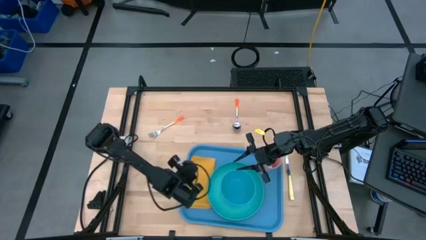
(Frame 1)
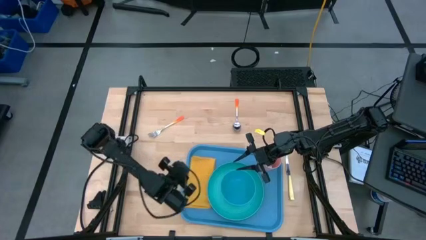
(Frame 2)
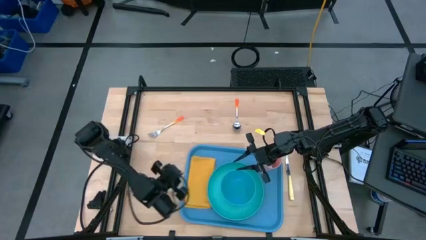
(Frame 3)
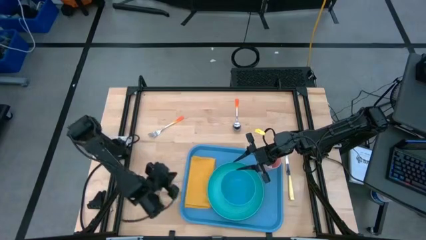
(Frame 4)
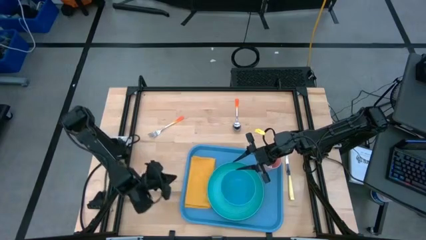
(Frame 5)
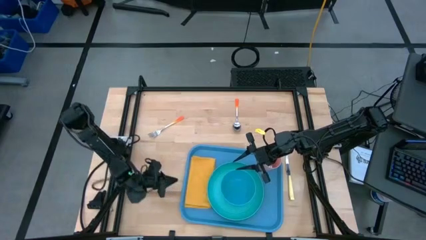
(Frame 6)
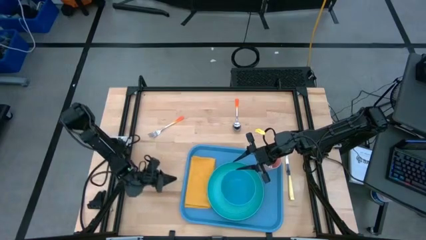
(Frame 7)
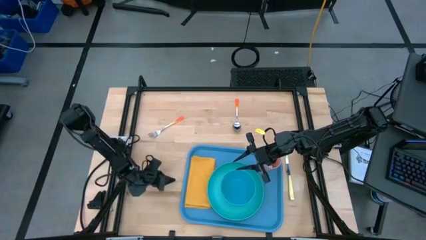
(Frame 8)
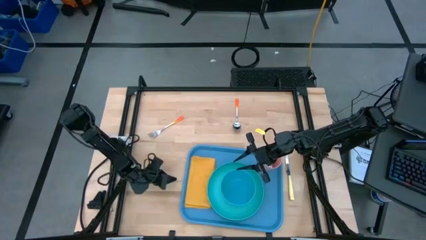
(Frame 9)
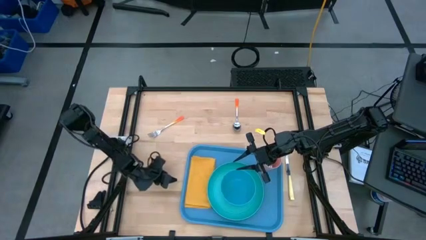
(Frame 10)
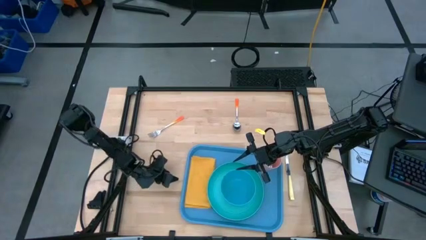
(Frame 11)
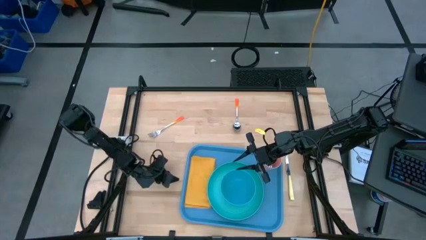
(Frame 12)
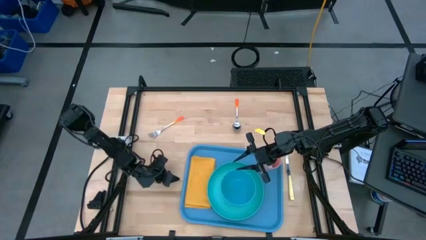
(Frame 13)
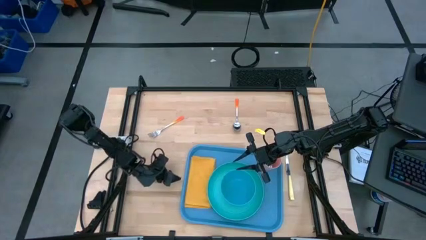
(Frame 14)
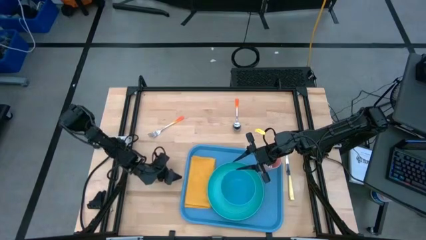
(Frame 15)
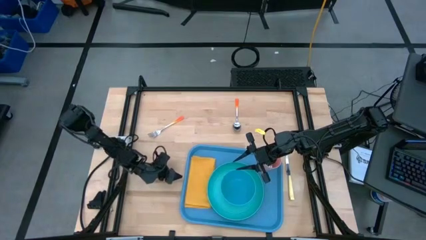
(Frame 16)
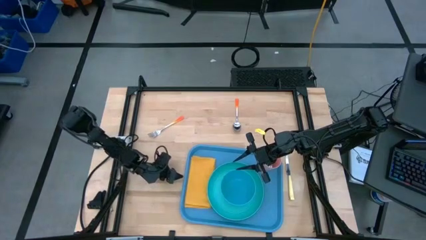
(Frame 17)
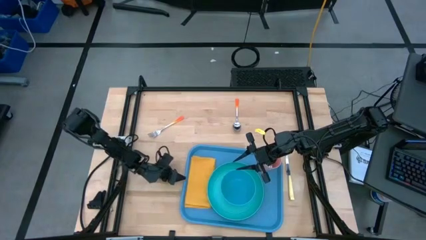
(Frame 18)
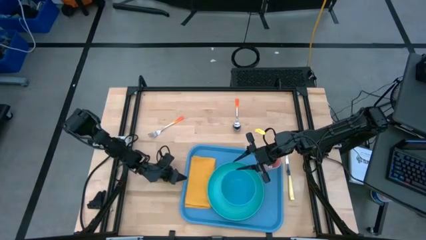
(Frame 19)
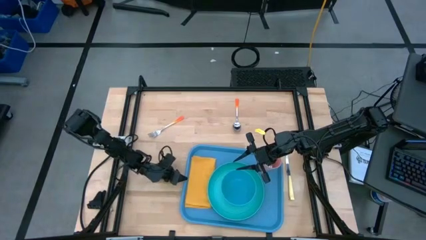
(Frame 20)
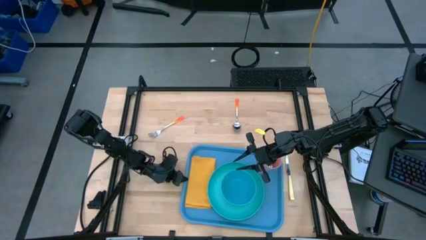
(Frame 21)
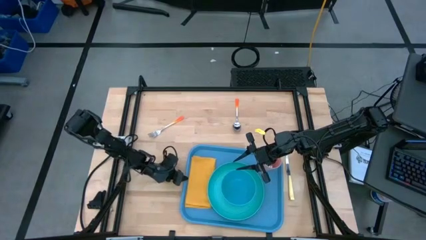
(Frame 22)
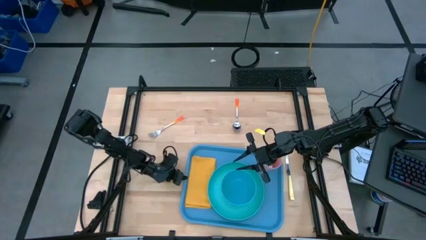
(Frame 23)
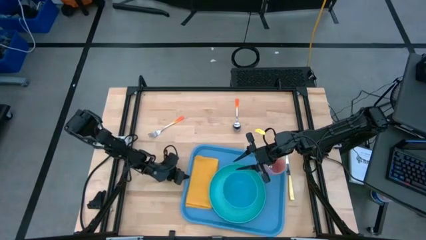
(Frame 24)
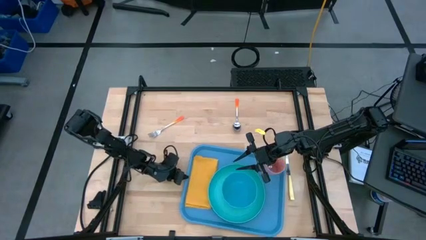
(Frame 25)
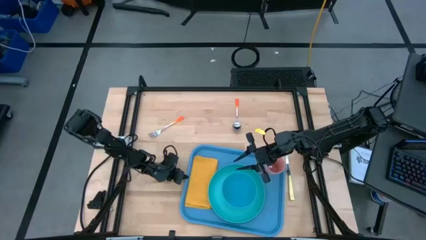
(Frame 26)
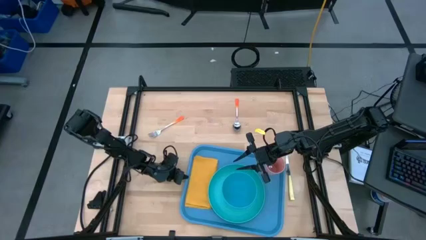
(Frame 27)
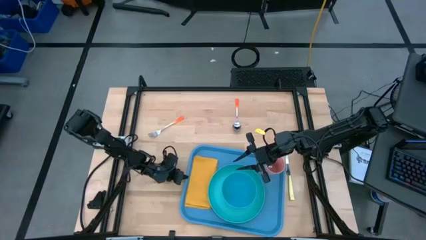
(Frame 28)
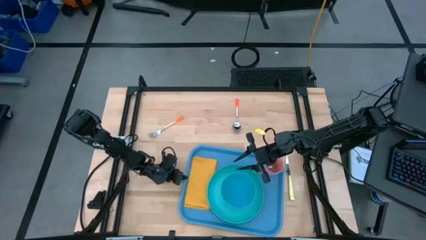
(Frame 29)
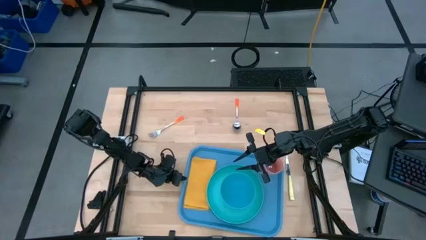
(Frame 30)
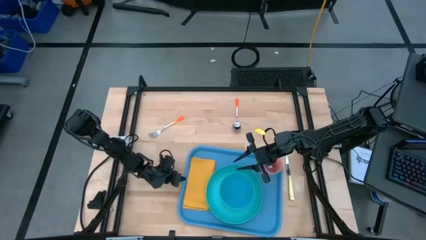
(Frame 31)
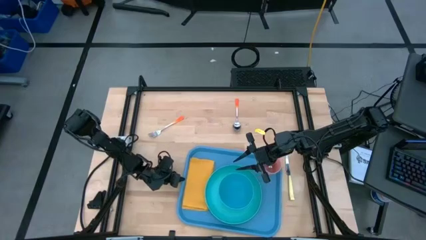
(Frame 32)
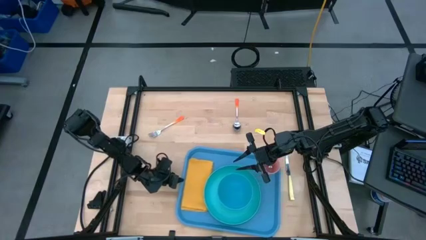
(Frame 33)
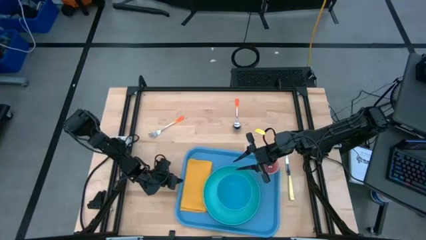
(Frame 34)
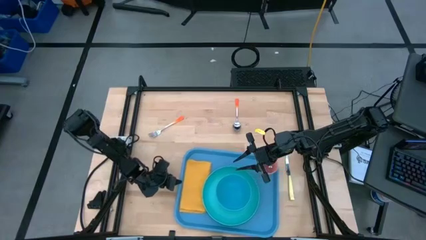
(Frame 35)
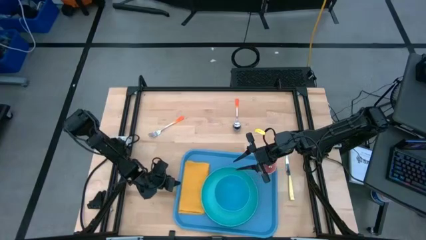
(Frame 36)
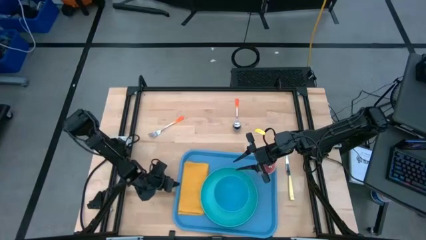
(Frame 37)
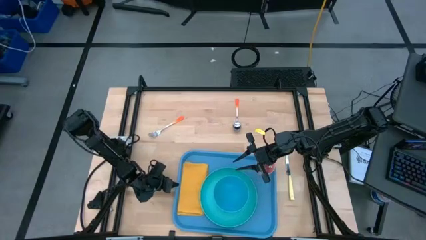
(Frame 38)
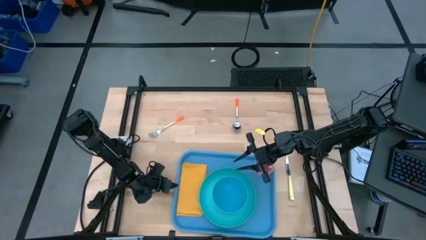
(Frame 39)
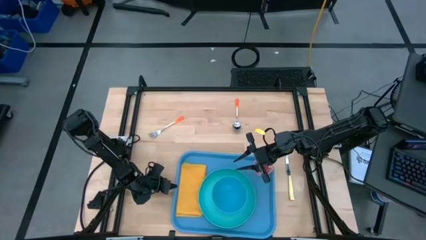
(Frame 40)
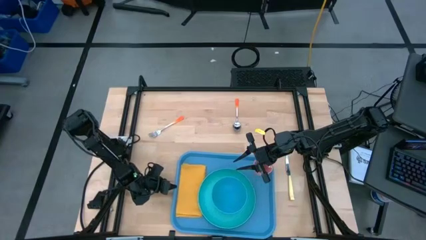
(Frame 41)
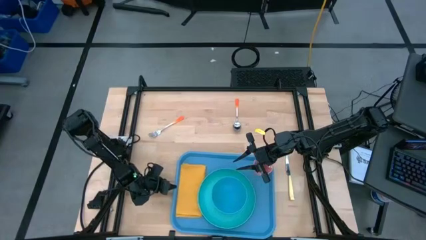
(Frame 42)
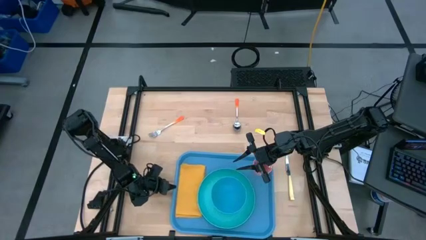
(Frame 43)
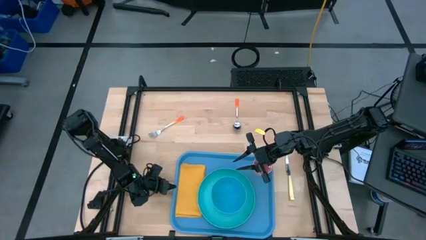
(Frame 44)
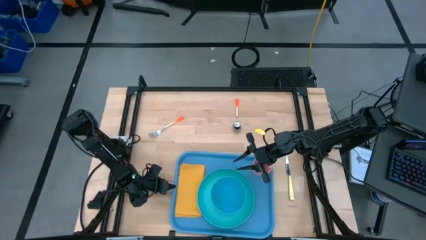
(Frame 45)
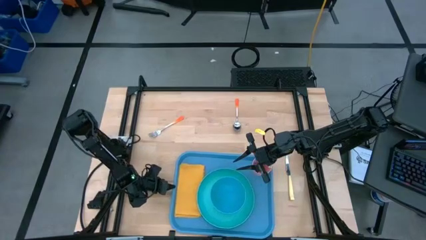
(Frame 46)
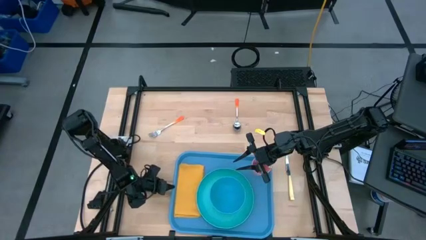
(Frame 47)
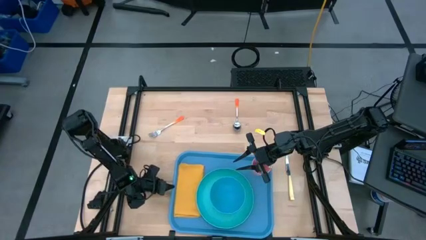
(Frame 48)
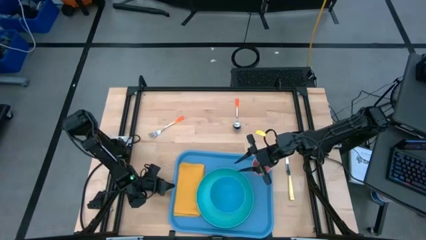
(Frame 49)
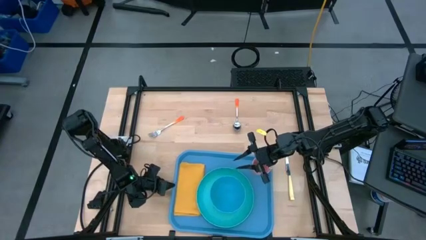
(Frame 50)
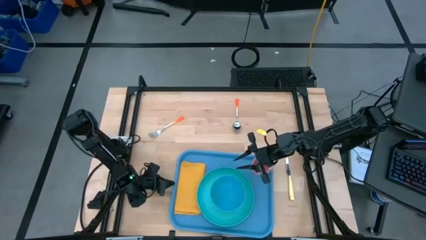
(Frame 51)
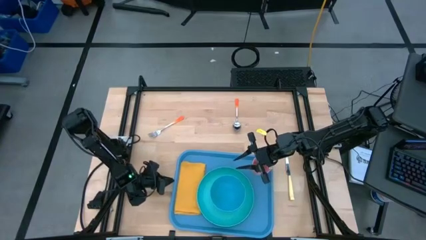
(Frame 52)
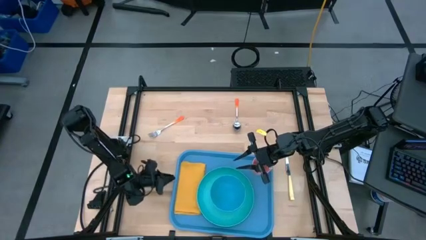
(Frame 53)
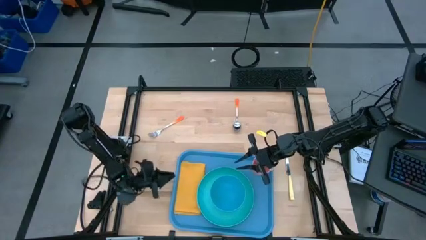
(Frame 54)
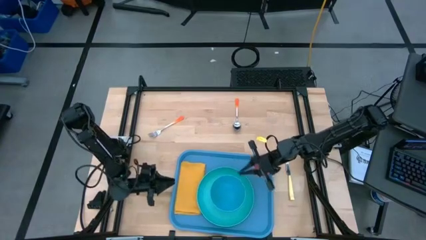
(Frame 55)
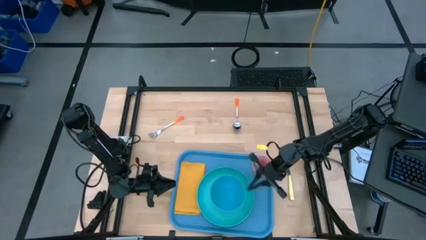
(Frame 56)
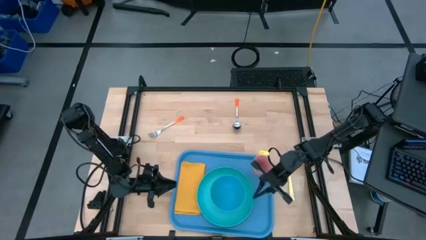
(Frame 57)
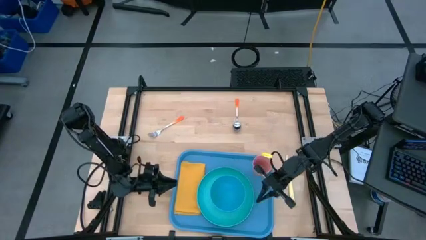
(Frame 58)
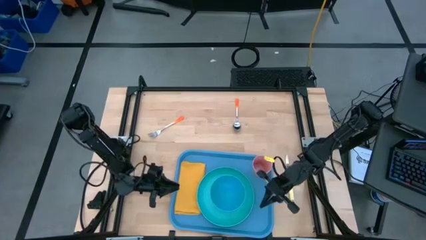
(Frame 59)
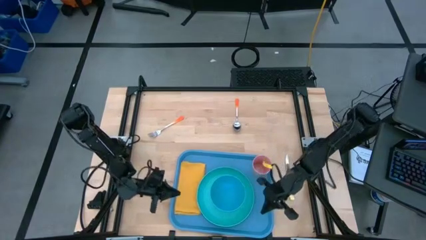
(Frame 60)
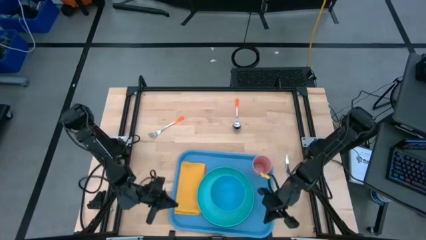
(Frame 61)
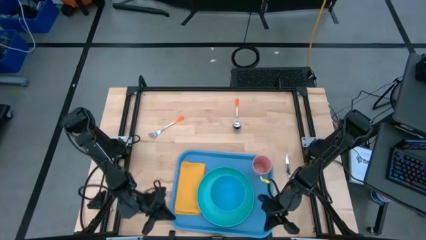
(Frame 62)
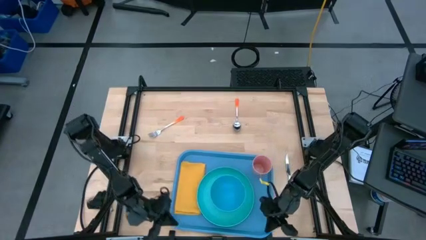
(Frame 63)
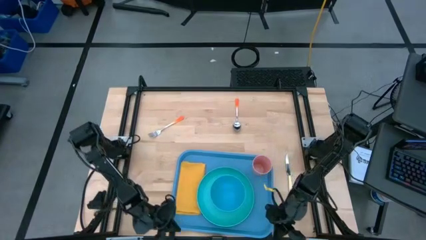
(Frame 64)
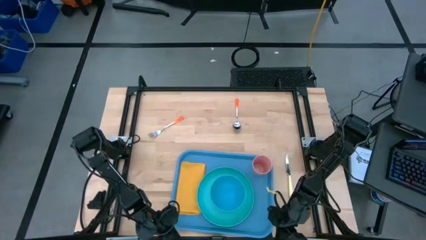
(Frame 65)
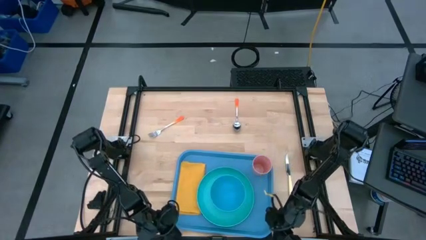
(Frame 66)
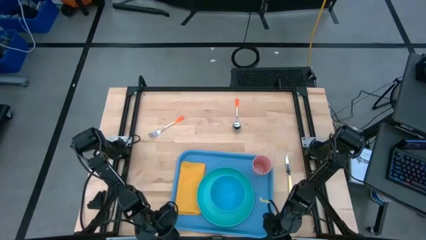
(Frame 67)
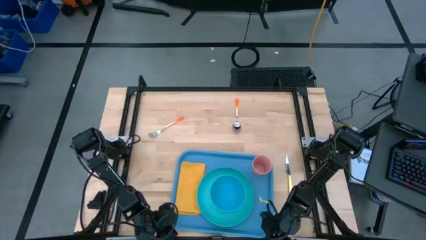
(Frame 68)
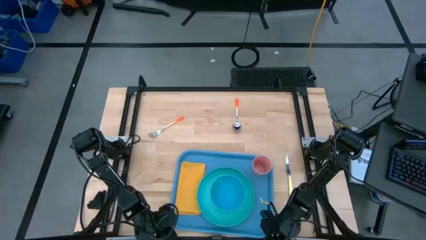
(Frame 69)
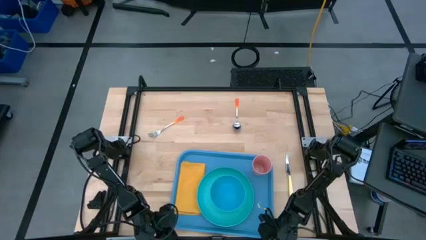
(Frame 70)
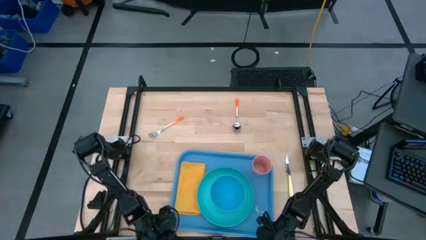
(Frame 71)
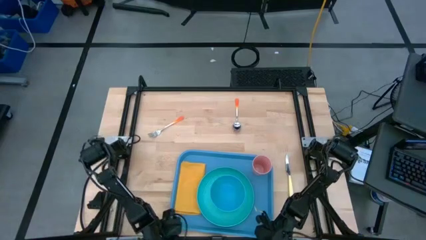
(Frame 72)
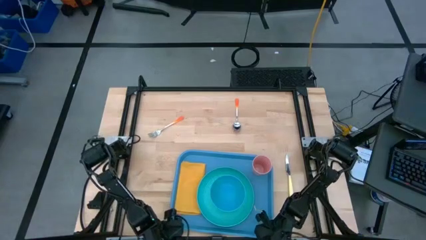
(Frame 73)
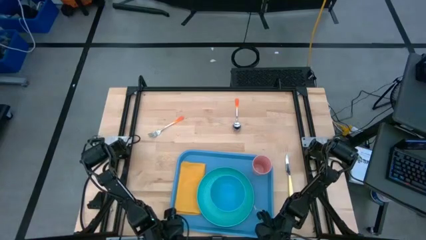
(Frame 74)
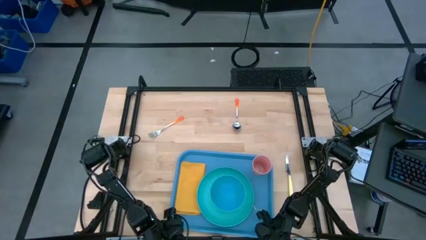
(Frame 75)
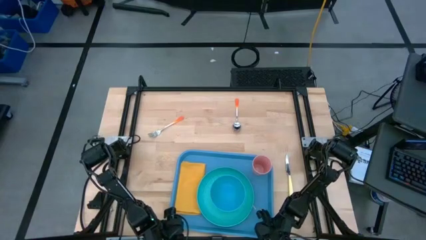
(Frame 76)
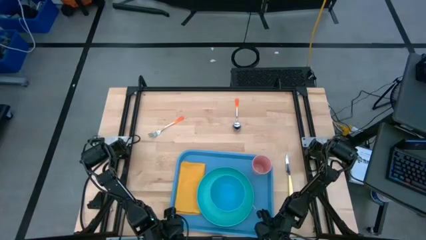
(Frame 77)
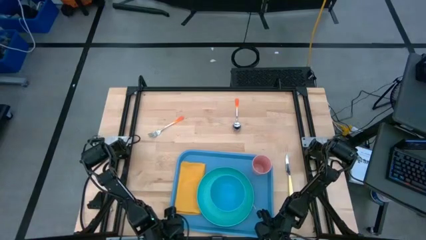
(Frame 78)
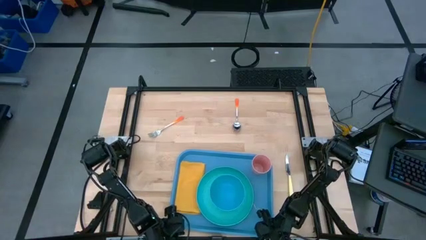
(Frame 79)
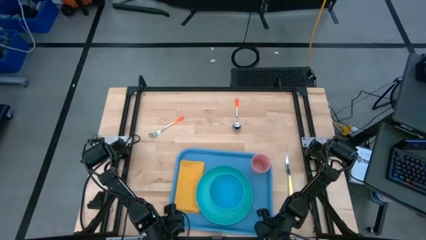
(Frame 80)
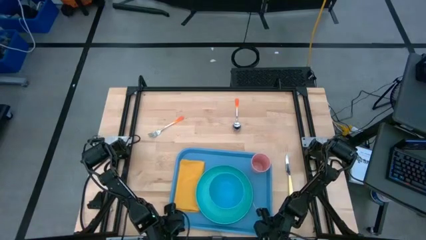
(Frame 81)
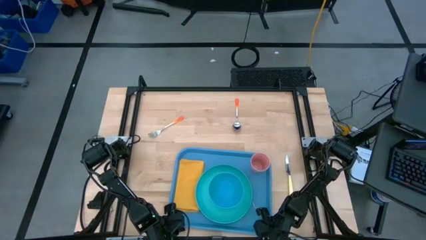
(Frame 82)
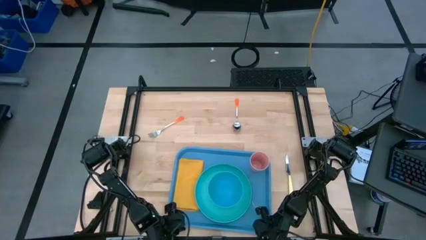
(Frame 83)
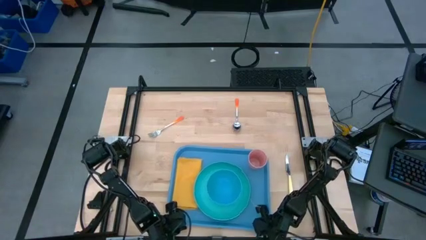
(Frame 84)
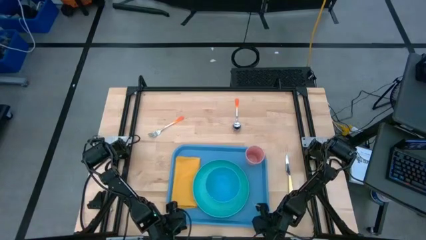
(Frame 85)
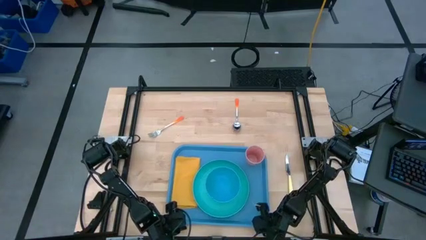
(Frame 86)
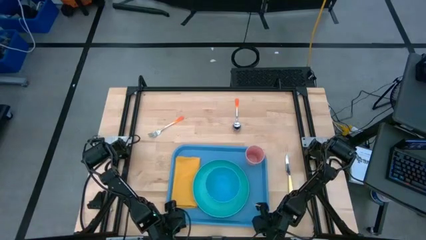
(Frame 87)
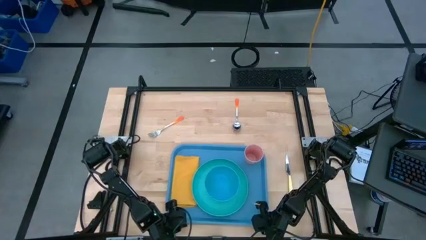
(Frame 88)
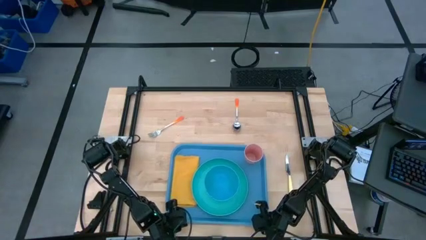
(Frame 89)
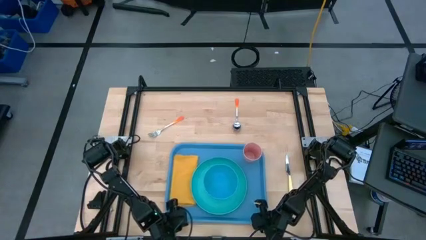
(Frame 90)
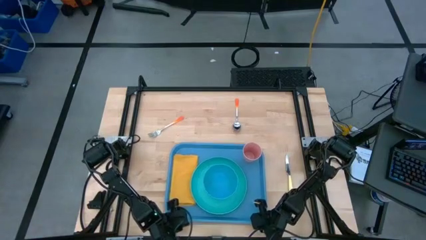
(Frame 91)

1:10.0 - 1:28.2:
Task: Set up tray
Adjust the blue serving tray
